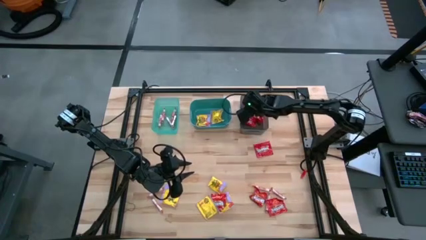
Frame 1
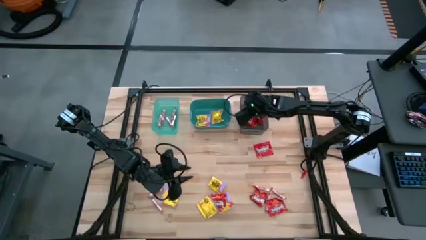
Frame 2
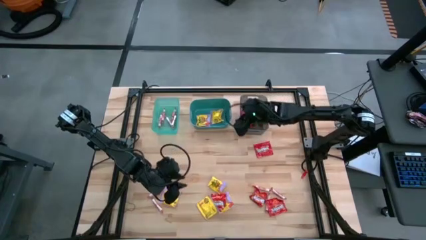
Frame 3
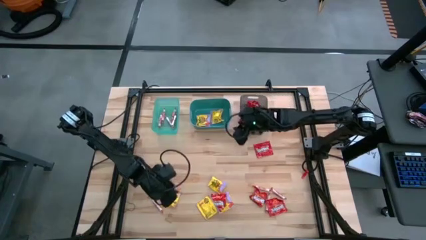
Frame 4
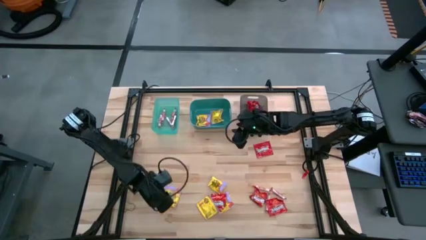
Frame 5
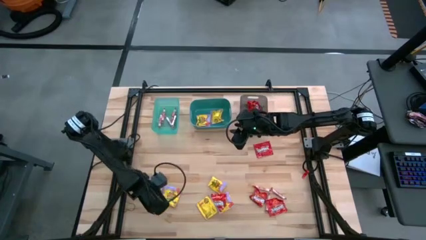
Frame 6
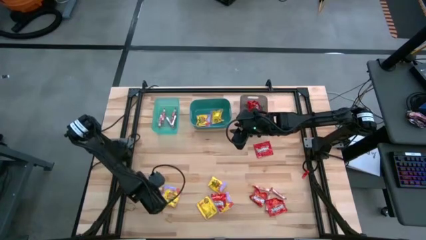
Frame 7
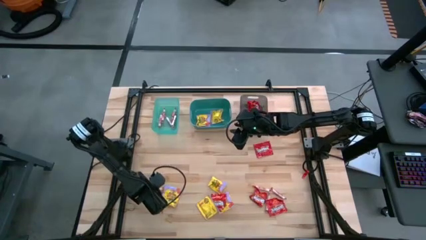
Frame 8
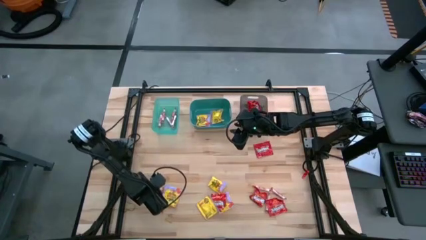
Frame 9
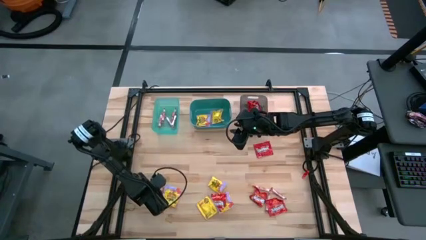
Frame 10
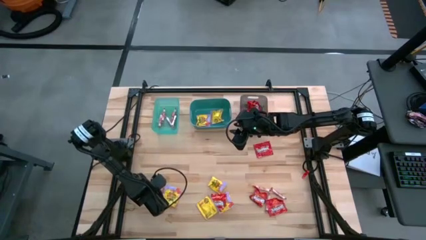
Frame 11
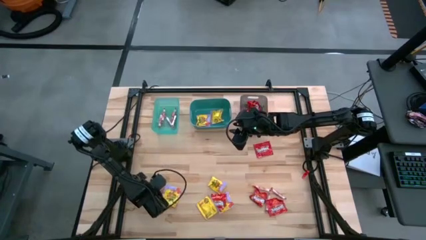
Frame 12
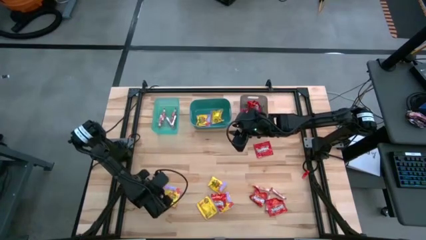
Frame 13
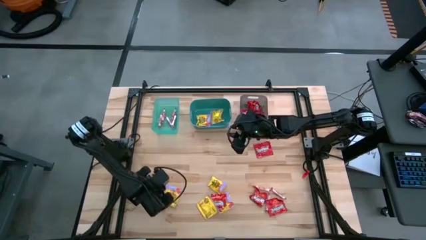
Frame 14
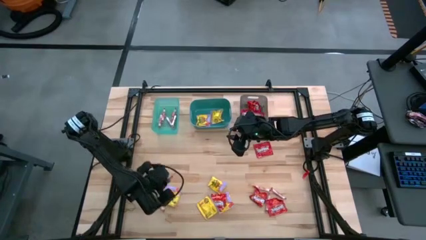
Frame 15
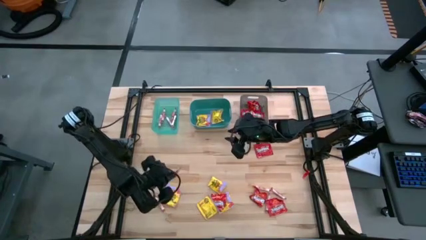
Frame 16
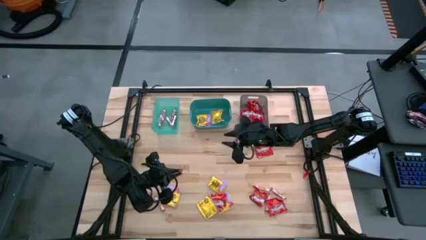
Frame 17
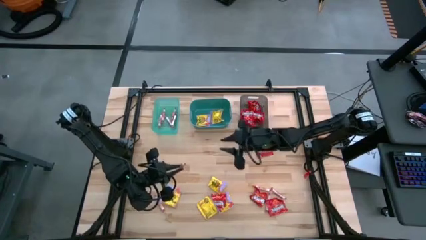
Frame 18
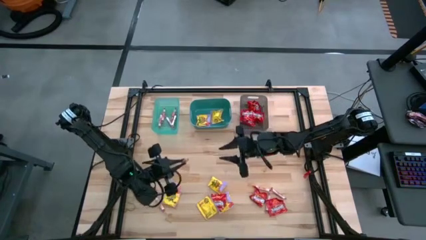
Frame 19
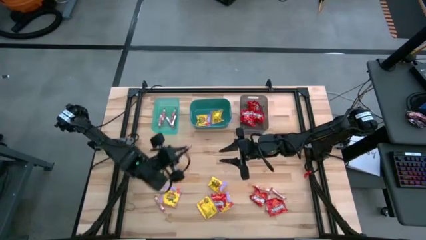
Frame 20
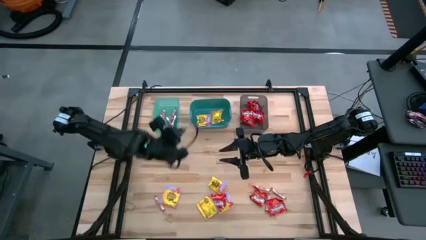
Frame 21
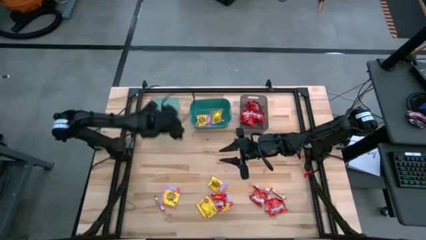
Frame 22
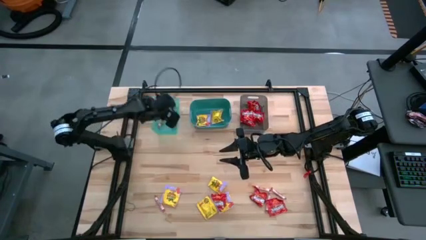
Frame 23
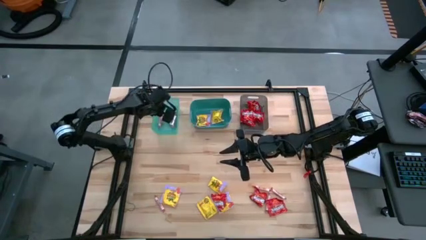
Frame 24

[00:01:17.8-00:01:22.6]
Task: Sort candy
Put the white candy into the blue bin

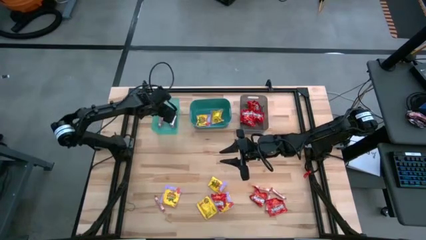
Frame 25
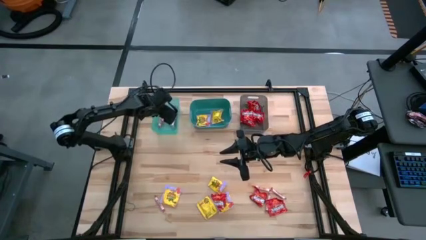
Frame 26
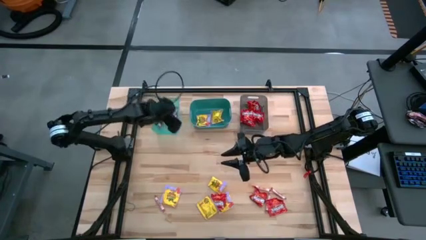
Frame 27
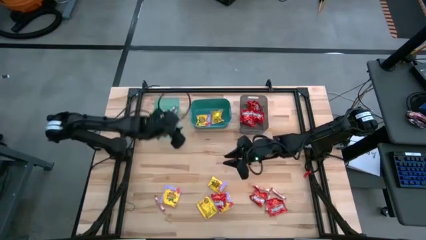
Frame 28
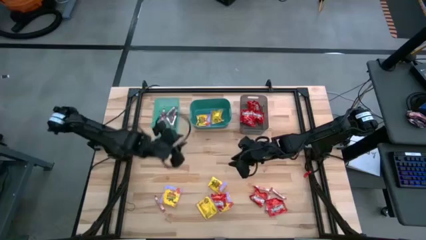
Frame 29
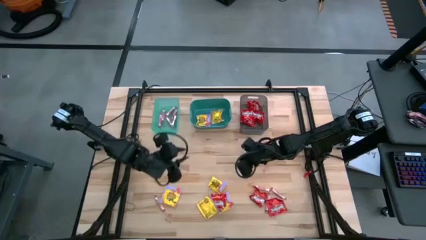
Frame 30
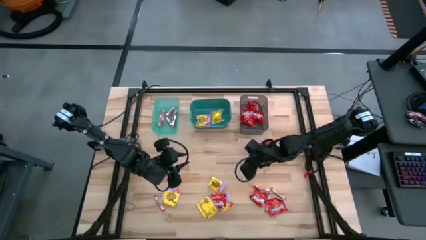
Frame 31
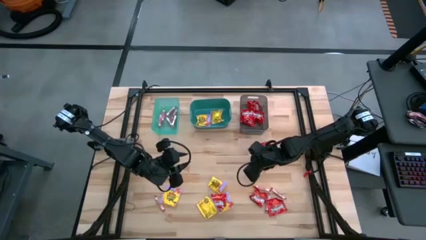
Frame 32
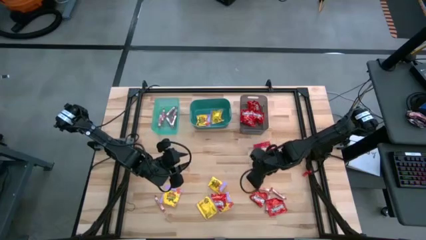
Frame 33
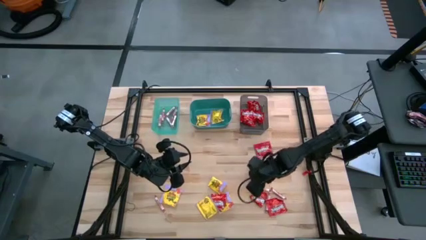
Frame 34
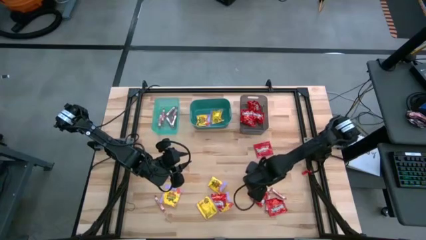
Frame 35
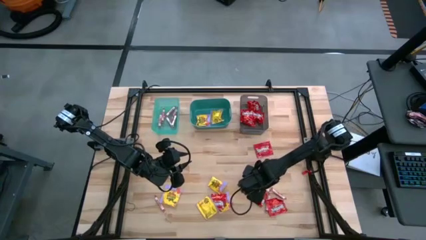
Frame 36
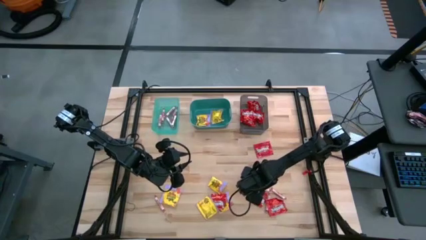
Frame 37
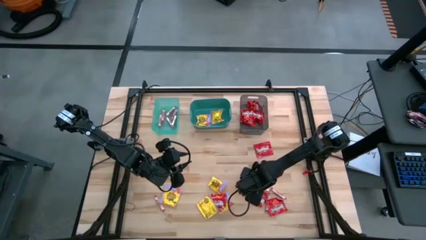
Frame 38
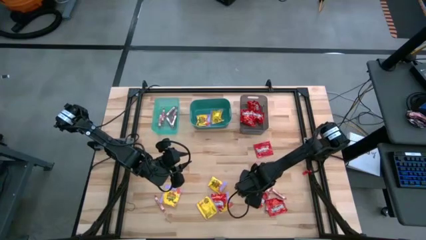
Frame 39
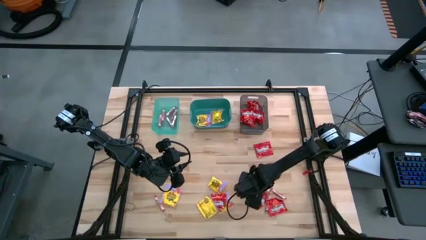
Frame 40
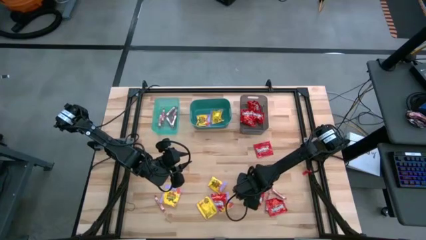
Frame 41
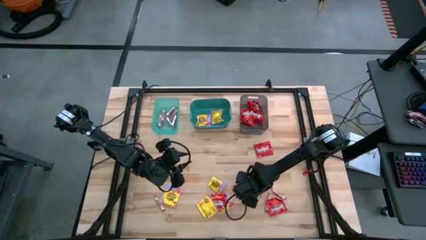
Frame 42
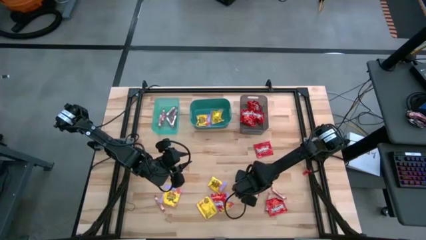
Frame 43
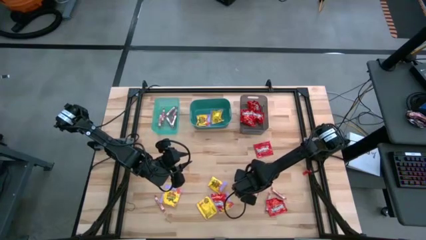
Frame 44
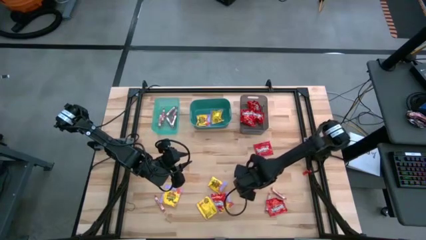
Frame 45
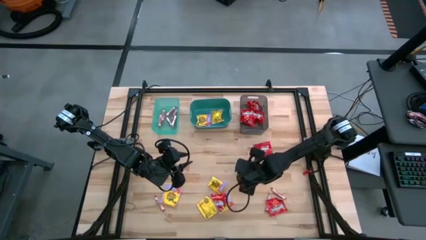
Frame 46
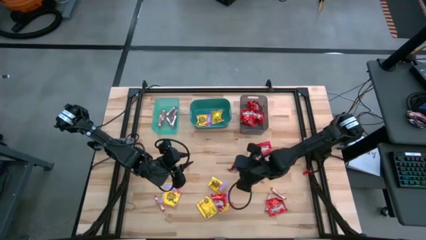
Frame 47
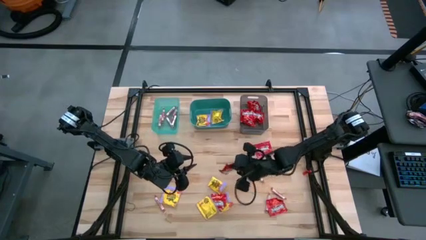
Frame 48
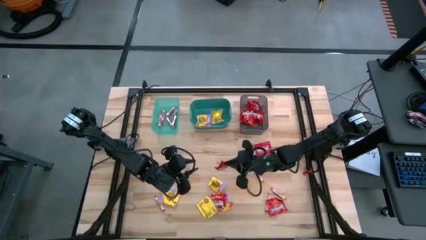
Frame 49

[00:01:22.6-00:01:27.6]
Put the red candy into the black bin

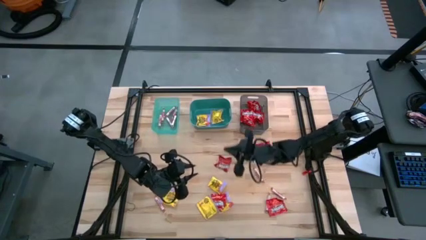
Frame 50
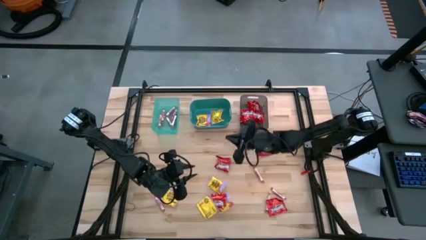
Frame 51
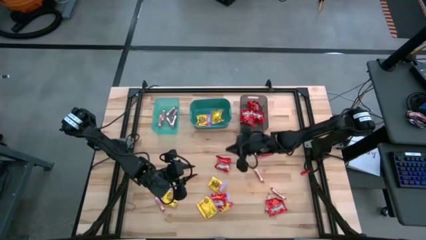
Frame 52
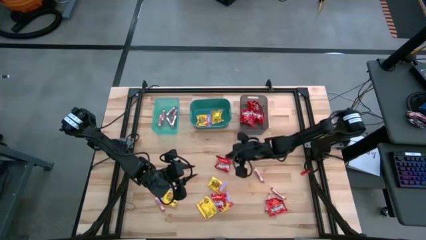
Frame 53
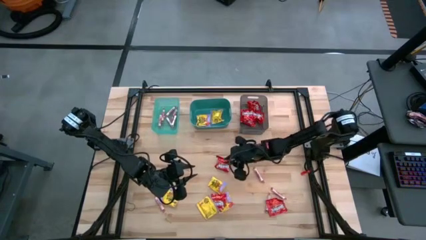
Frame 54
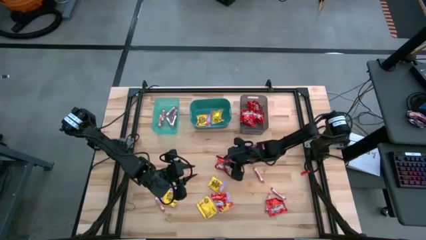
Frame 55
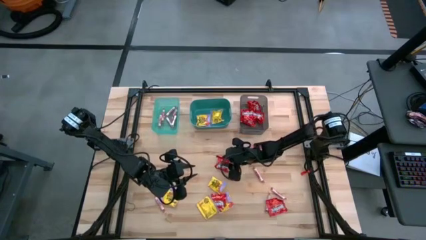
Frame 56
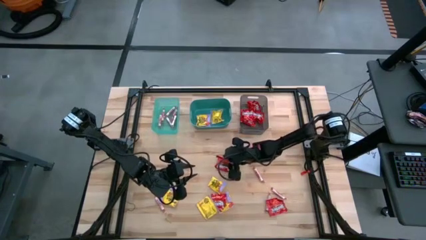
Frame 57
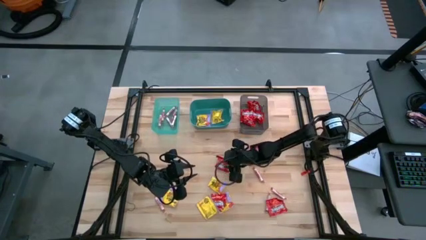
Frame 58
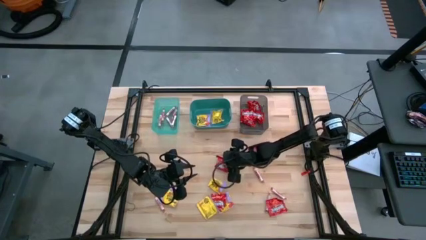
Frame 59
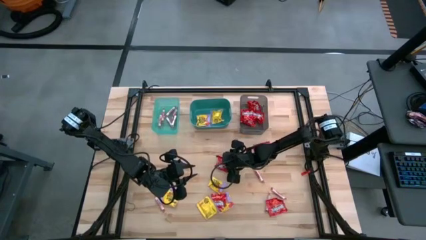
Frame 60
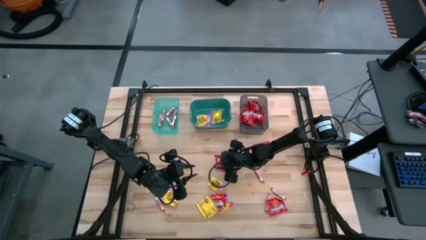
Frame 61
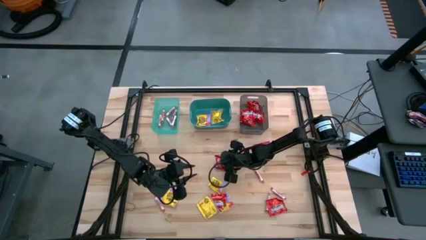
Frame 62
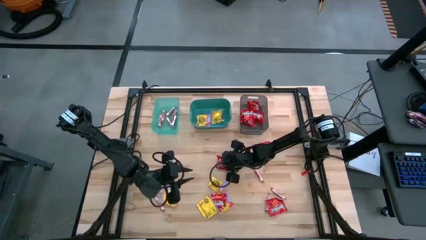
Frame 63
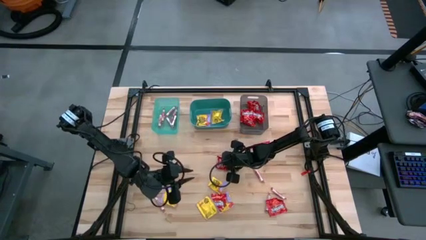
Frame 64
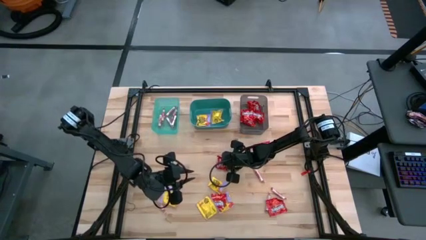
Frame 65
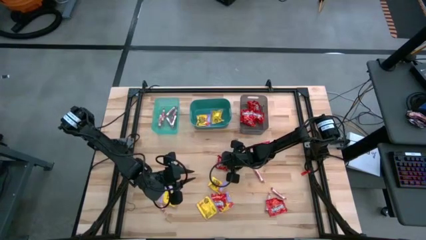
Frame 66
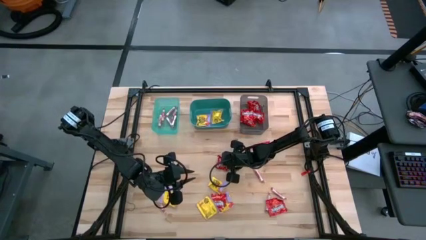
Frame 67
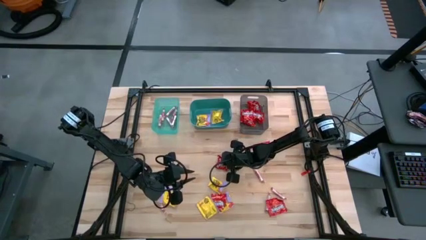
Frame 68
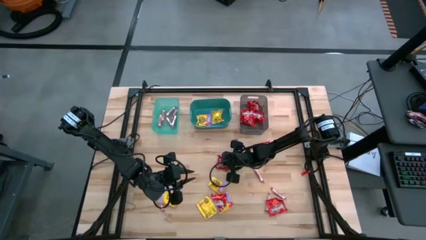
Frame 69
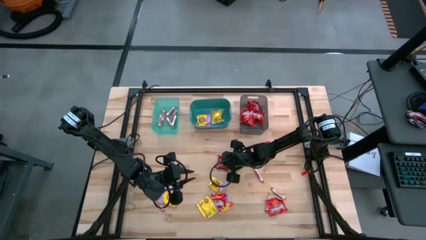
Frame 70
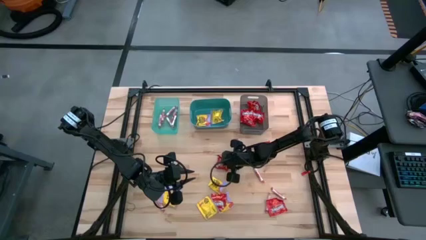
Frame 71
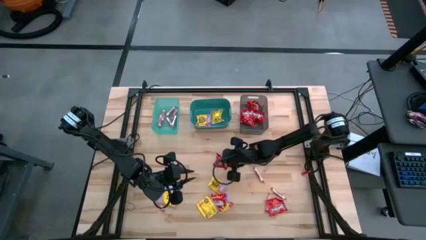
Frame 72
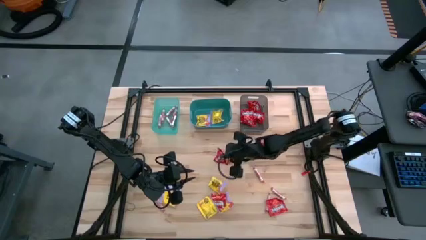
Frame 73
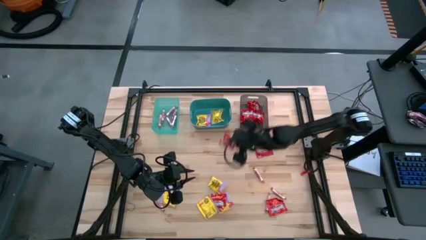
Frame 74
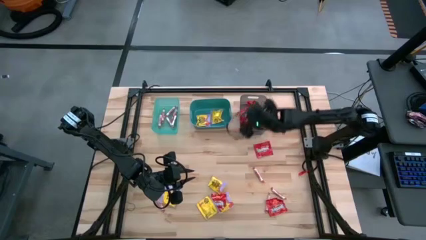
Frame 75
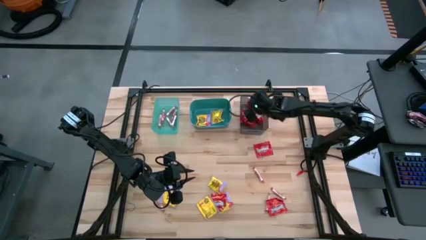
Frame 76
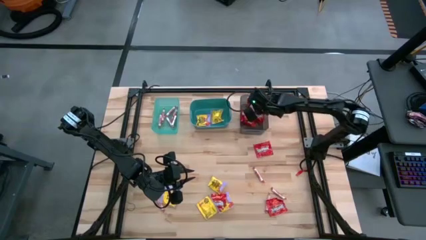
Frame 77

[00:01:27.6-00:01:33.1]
Put the red candy into the black bin

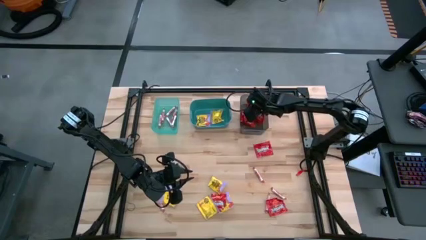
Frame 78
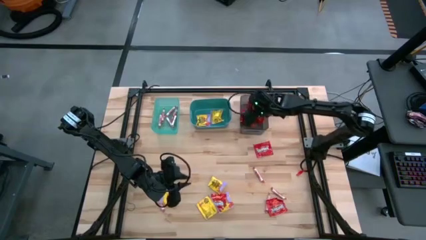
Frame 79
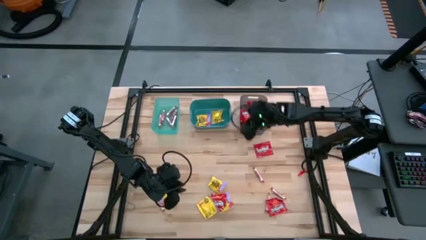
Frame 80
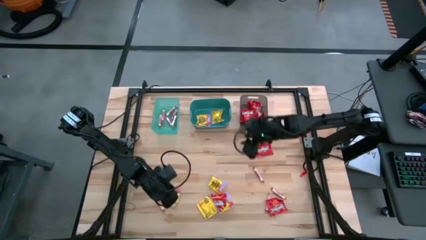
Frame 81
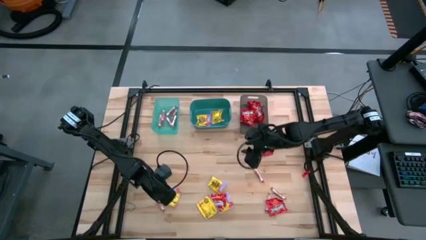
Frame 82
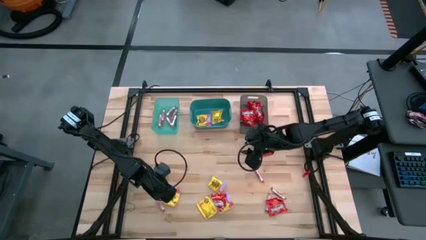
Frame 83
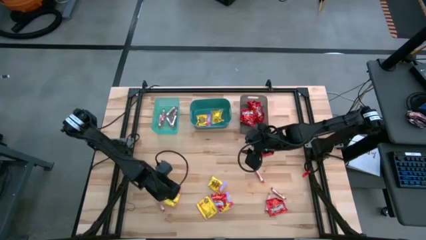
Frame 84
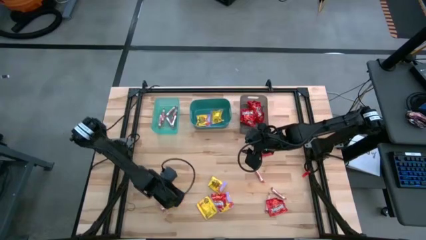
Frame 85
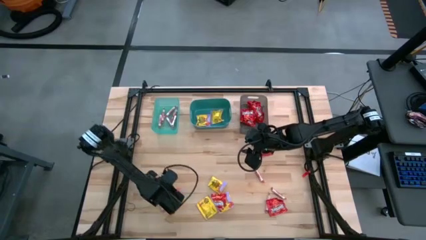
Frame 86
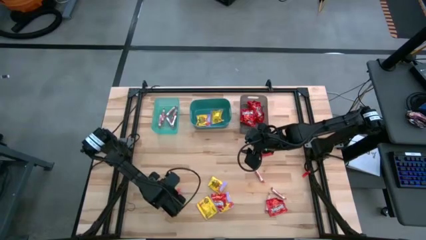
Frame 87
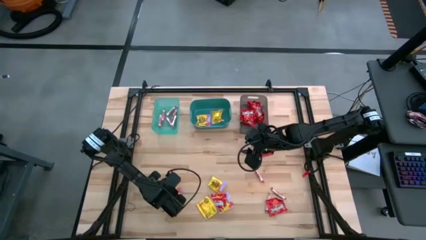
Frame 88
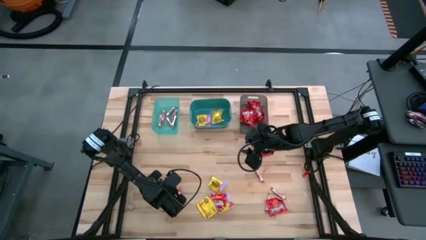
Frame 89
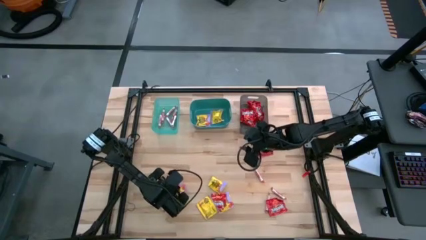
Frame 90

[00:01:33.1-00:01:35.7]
Put the yellow candy into the green bin
